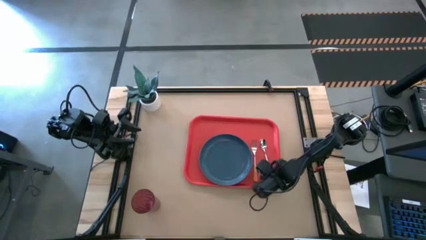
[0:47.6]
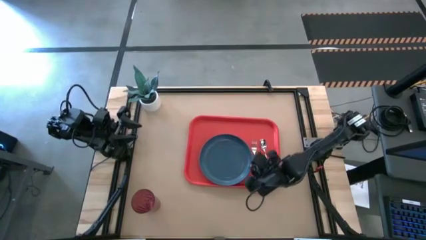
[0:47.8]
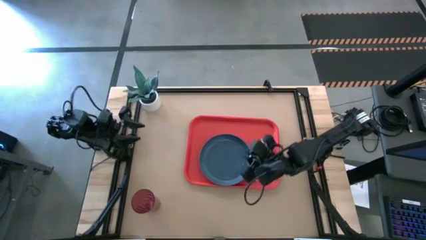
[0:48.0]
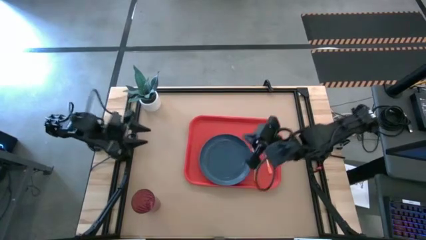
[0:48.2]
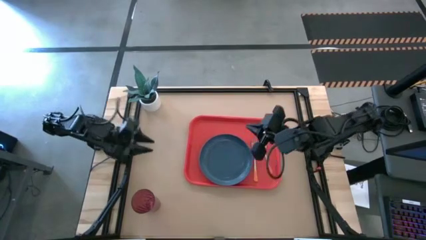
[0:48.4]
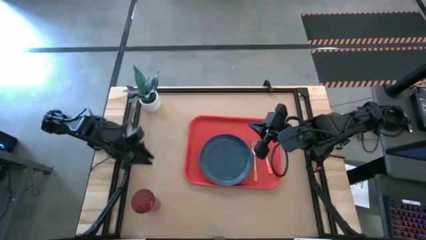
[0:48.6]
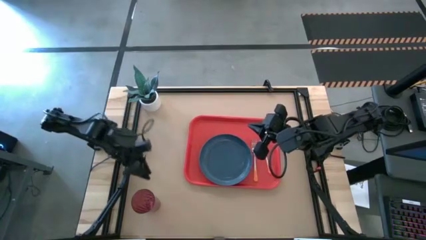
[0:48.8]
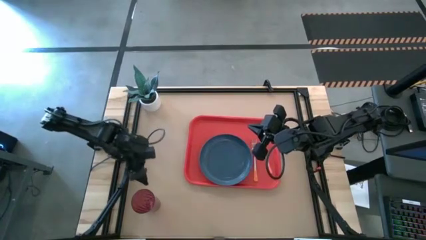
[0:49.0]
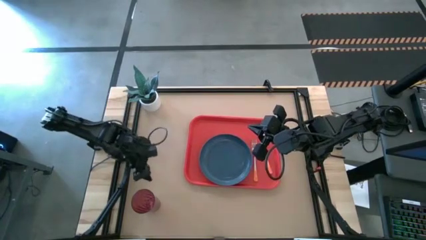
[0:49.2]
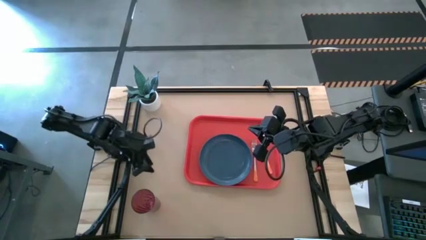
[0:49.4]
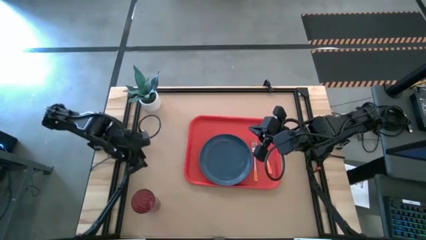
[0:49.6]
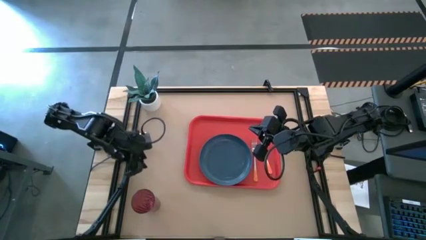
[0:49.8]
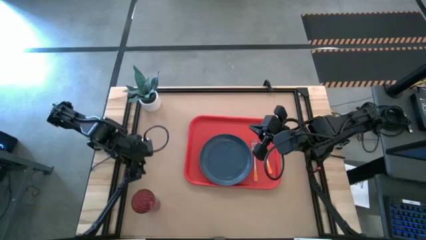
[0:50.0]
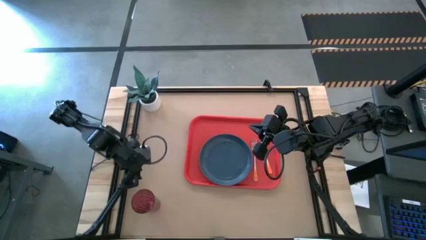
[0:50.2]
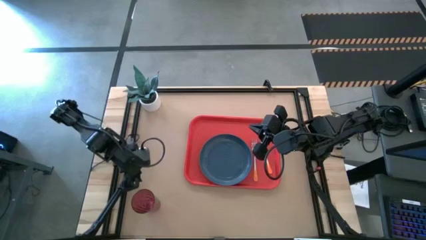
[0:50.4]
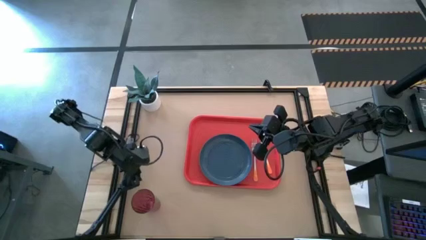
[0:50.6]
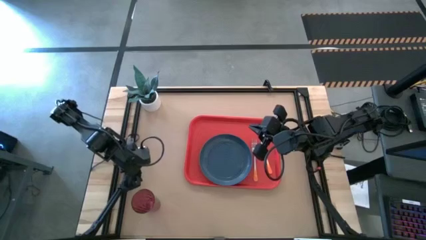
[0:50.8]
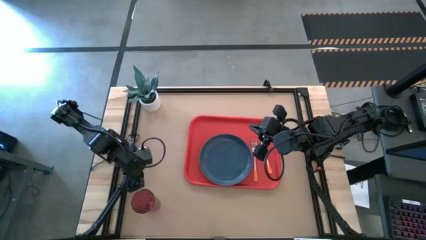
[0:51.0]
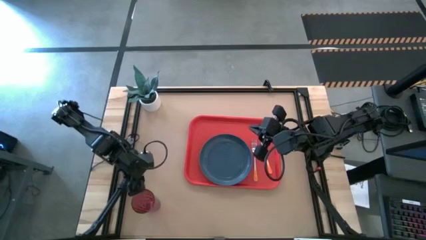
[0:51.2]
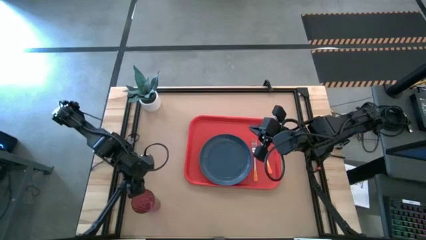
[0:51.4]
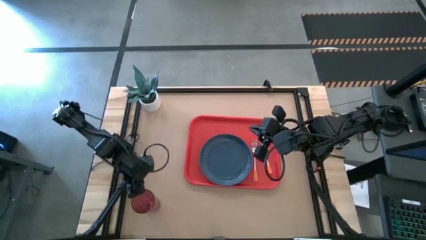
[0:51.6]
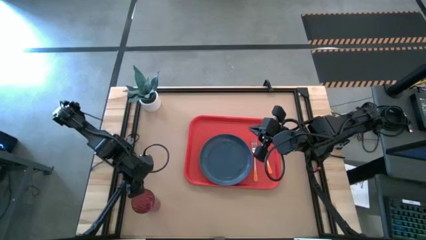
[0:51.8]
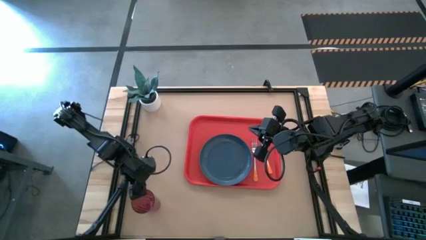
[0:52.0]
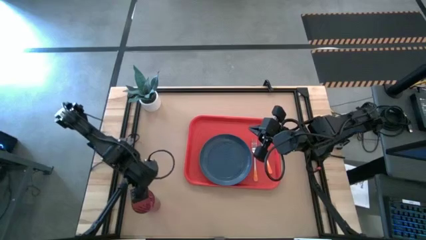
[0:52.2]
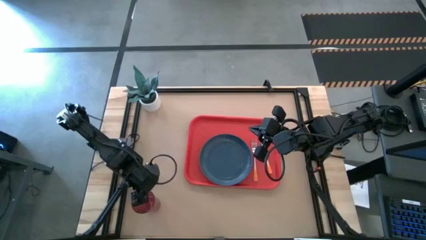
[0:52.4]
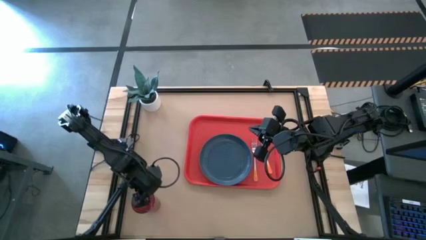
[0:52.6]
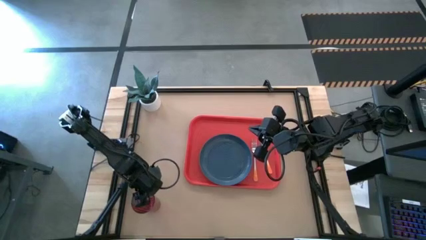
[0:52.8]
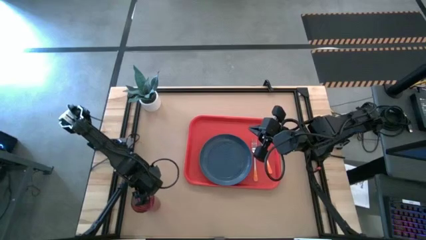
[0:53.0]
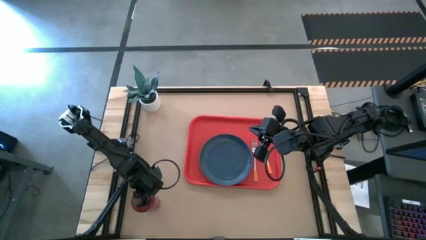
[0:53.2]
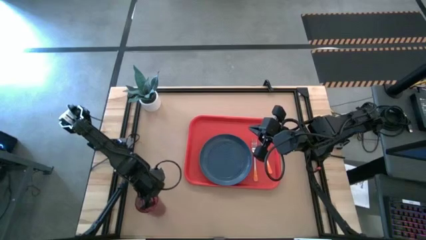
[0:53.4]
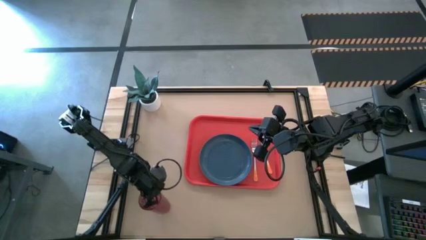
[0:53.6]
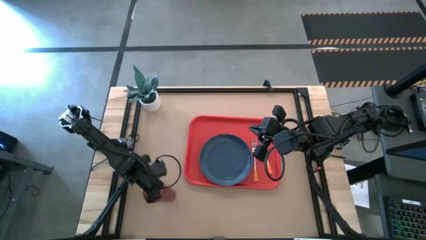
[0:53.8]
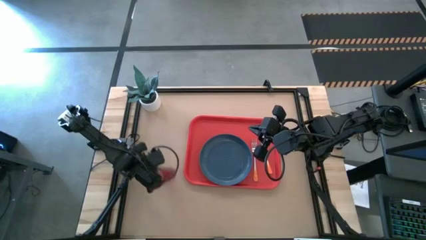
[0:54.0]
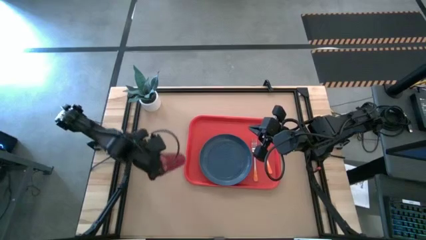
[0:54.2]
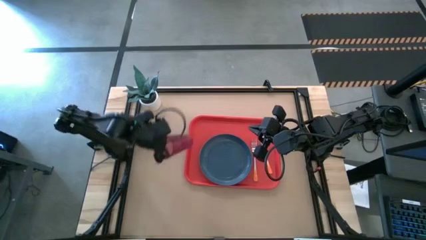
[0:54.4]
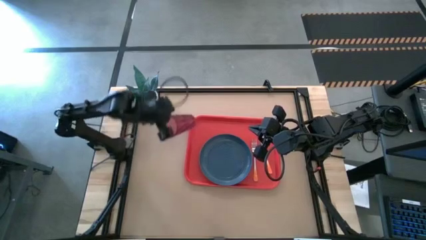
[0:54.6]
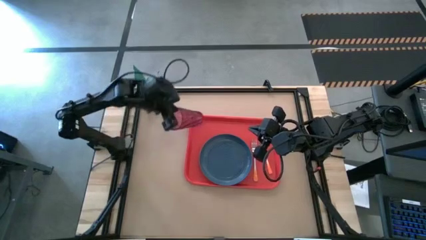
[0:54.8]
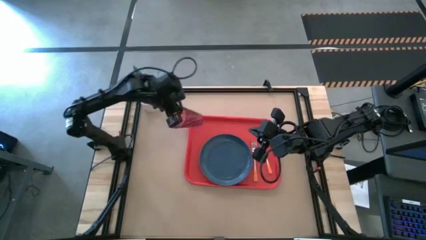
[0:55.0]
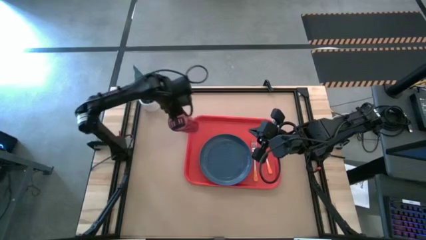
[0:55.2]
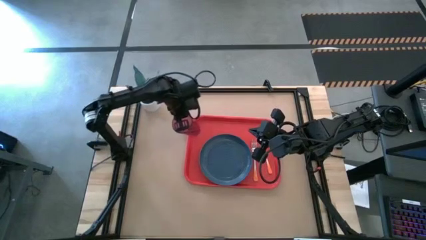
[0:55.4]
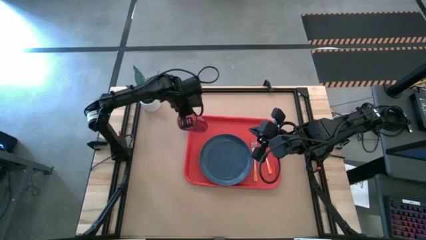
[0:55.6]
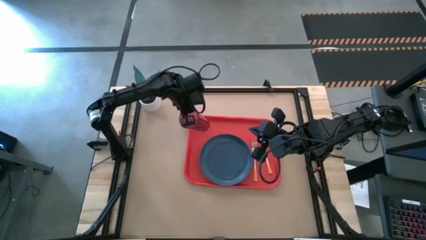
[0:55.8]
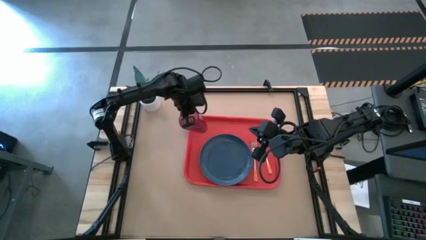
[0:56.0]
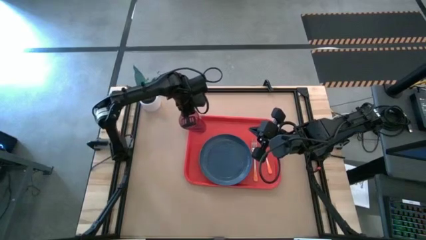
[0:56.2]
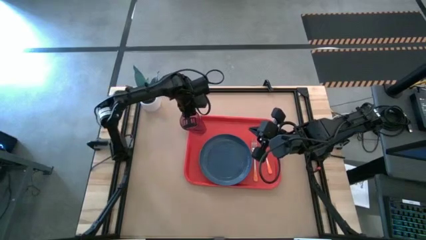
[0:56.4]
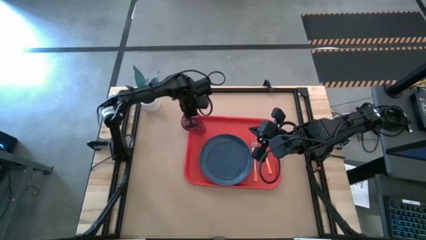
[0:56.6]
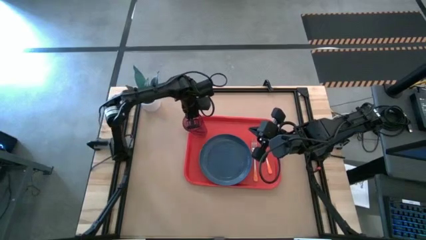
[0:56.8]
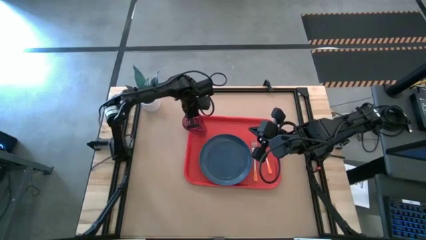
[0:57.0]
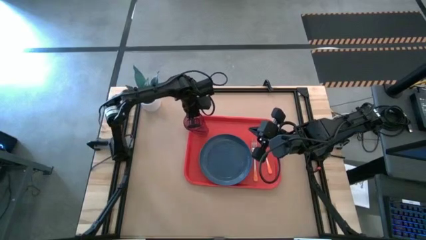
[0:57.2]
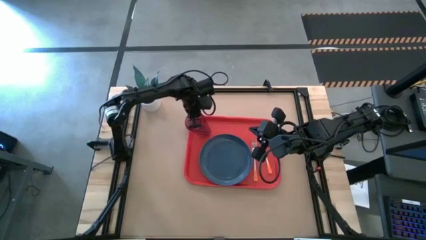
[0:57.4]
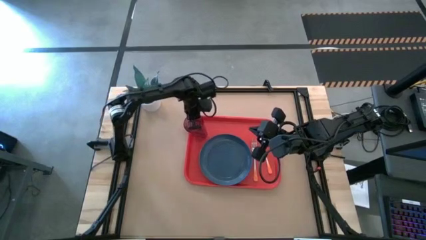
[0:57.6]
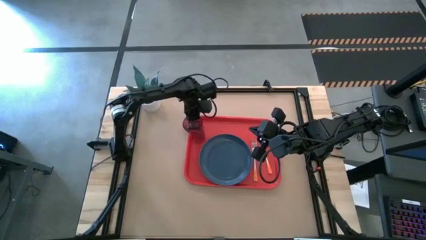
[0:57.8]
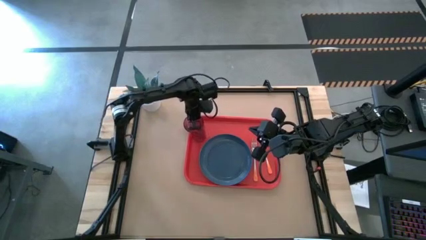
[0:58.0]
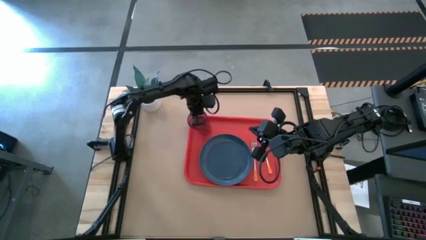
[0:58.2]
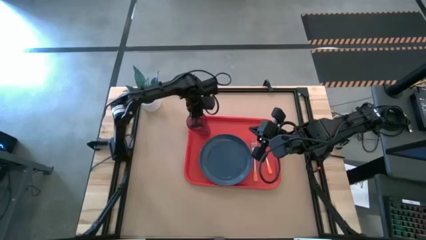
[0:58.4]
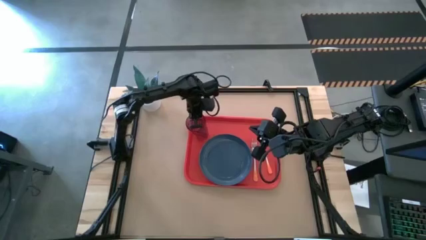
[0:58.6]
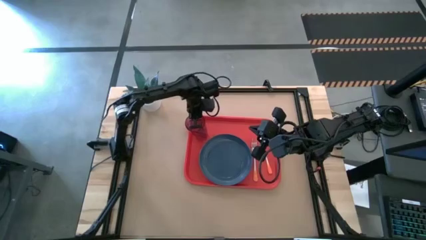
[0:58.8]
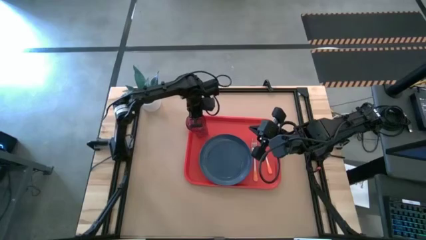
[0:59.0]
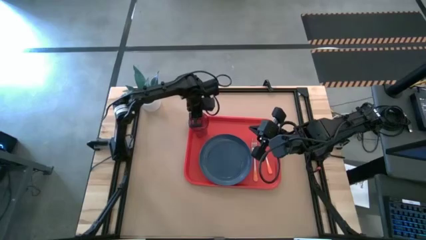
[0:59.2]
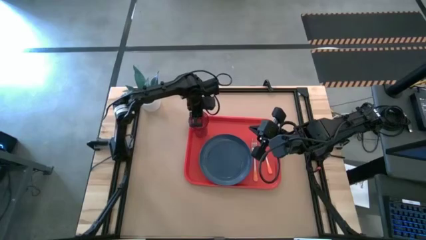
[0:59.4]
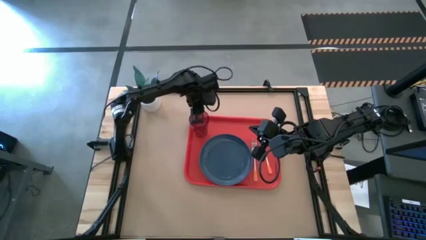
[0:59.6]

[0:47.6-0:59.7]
Task: Pick and place plate/cup/fork/spoon on tray
Put the purple cup on the top left of the red tray

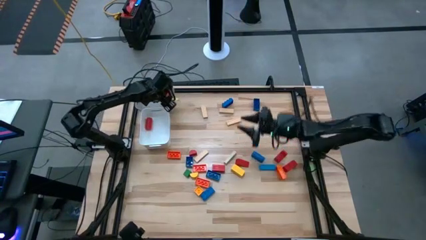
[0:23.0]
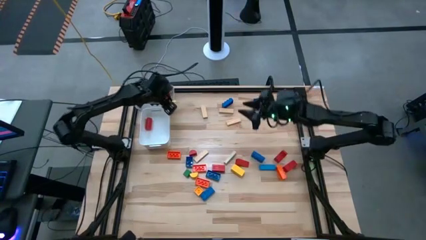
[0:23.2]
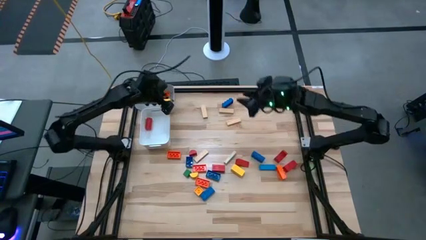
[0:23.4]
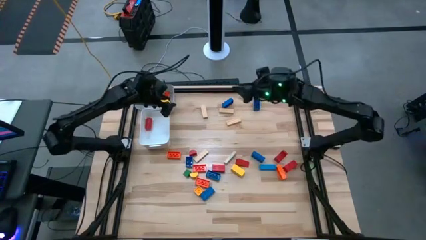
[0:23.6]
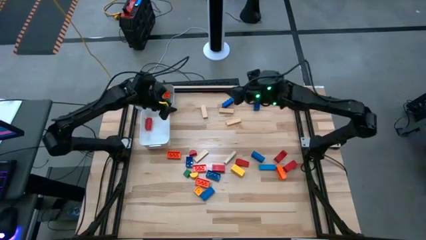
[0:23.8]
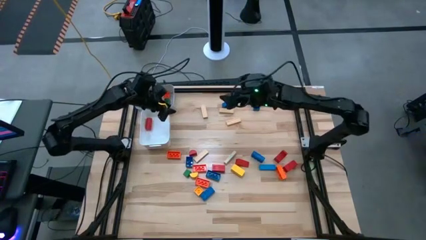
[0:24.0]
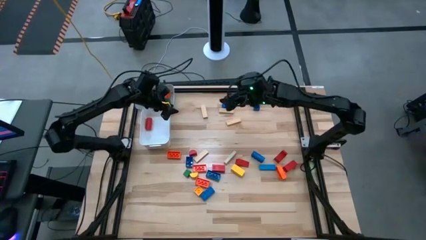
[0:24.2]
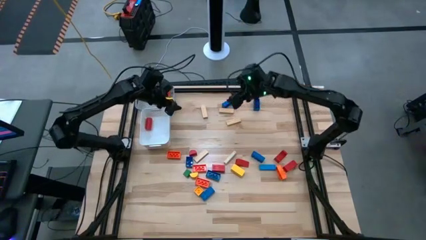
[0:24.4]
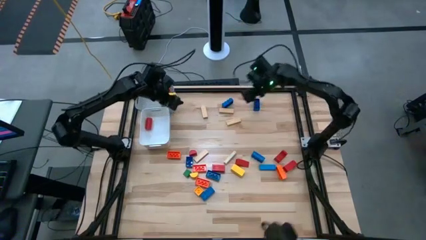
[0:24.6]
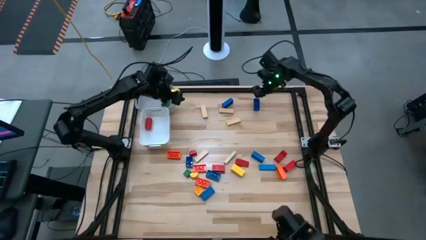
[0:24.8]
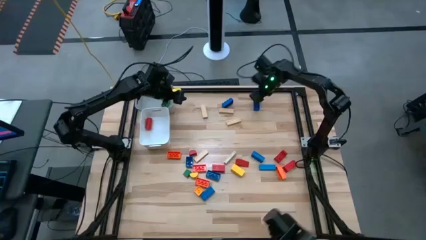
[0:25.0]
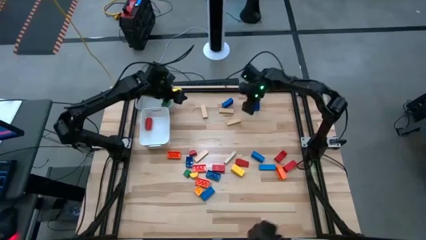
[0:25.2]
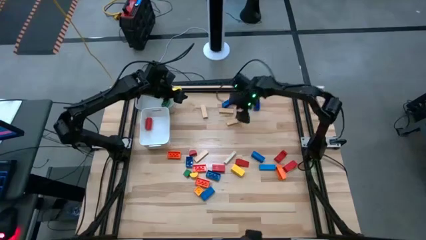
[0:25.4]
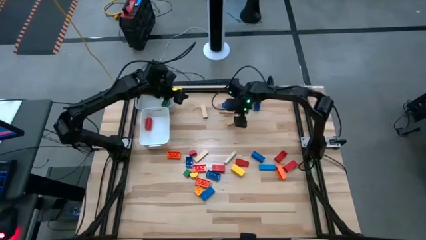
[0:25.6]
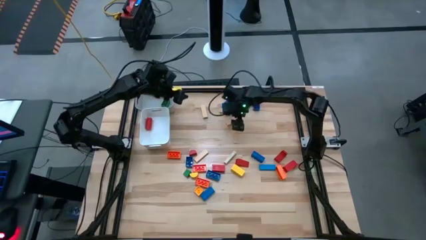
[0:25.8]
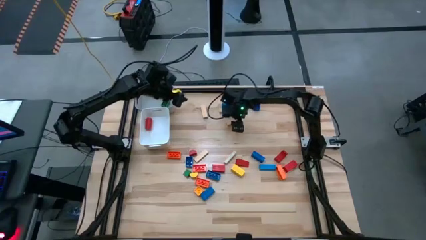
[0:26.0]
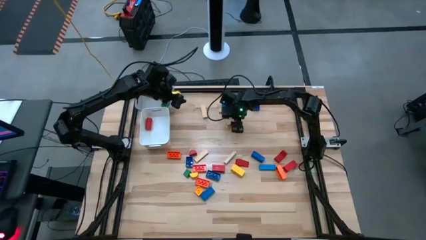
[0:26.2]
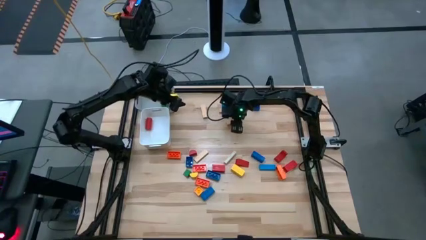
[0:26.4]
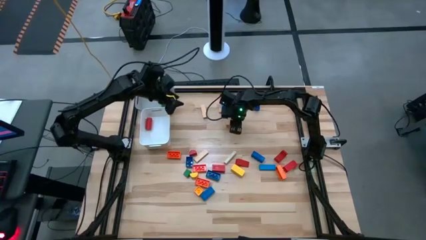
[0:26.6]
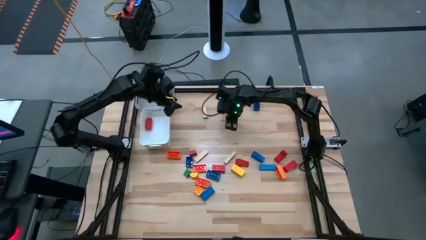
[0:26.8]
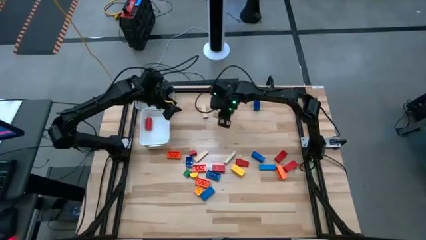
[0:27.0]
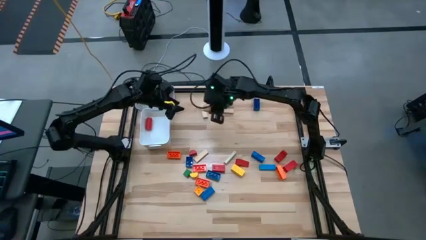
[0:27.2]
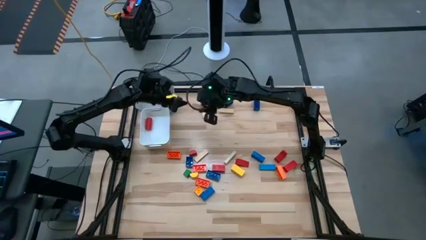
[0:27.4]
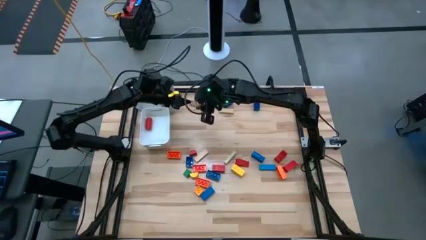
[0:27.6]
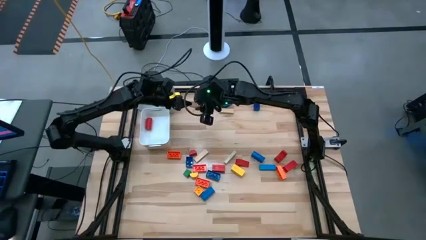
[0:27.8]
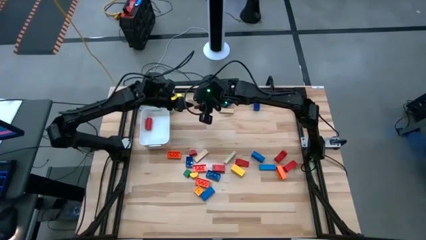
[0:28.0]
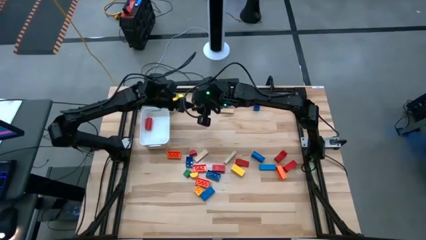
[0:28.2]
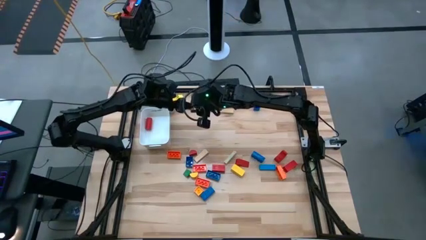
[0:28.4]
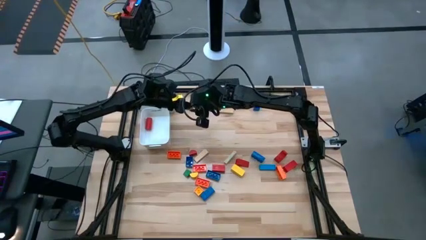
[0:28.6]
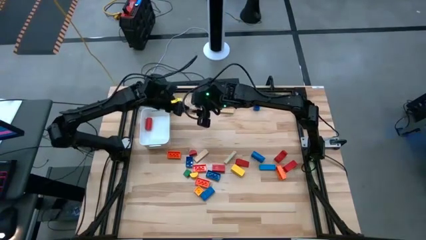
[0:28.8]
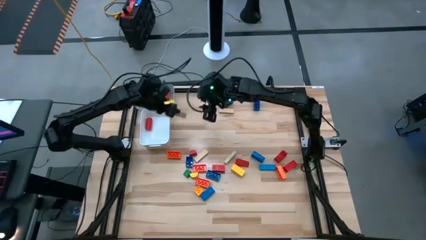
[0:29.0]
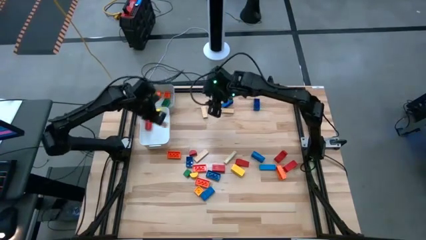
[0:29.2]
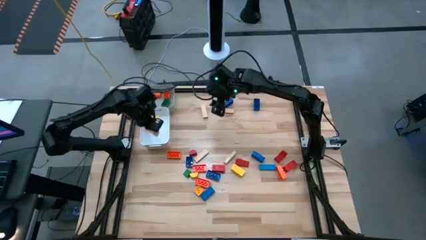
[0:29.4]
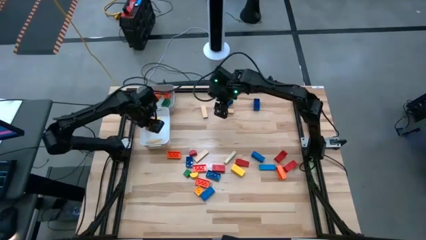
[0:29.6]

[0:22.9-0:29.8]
Task: Sort blocks by size
Put the large brown wooden block into the white bin
